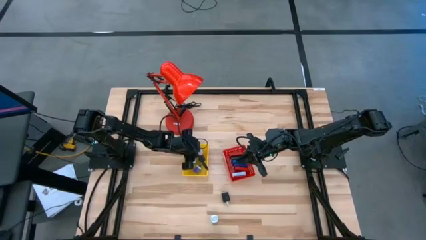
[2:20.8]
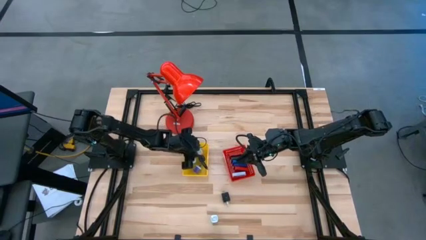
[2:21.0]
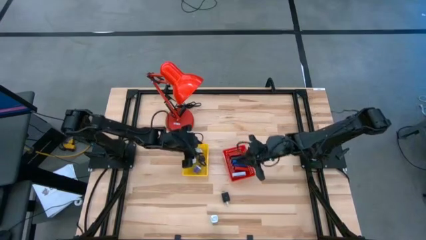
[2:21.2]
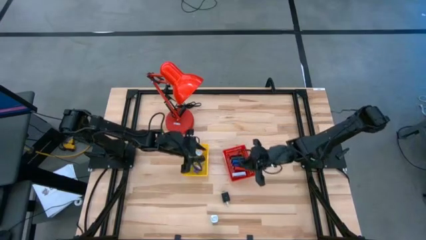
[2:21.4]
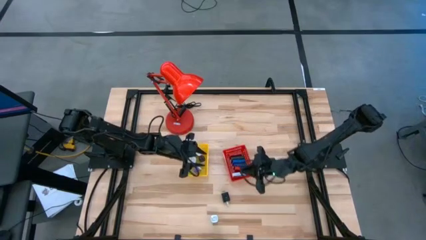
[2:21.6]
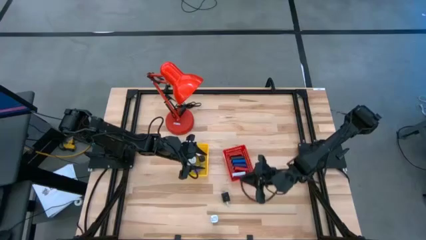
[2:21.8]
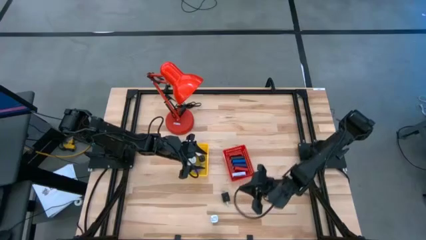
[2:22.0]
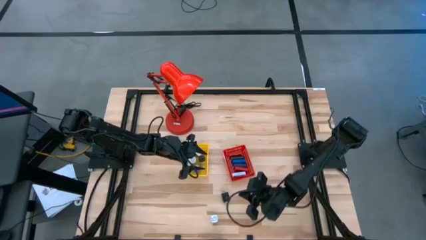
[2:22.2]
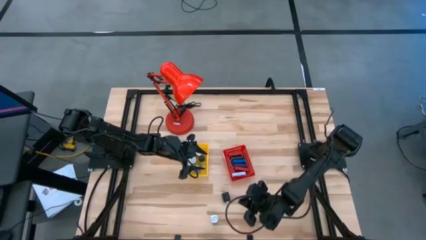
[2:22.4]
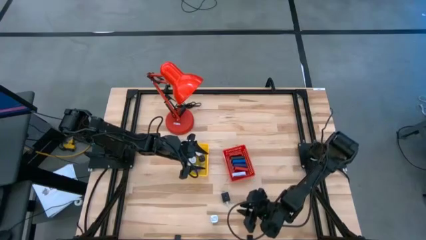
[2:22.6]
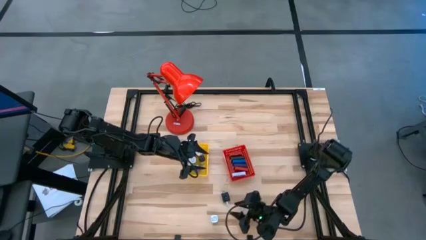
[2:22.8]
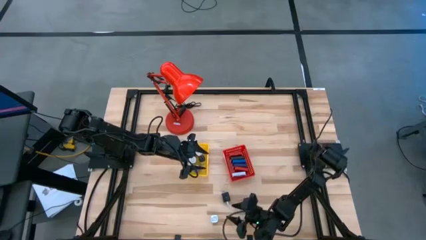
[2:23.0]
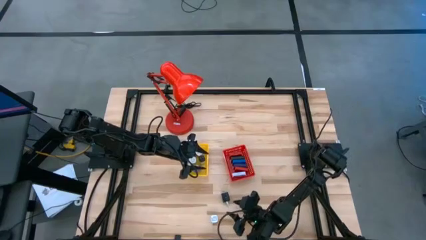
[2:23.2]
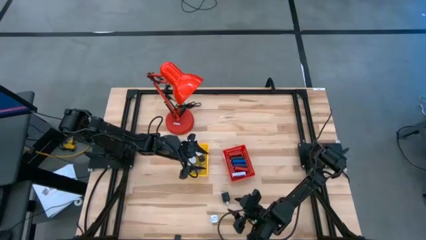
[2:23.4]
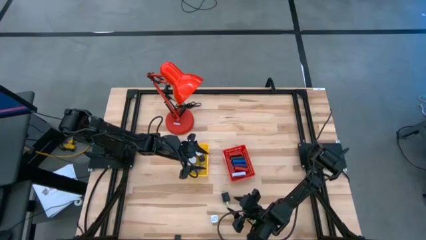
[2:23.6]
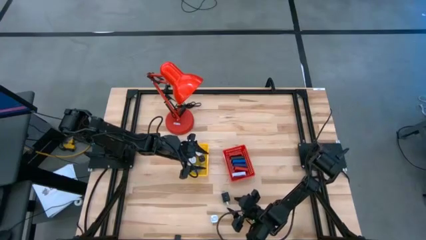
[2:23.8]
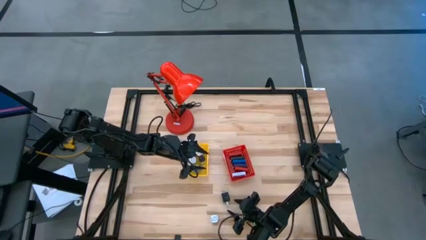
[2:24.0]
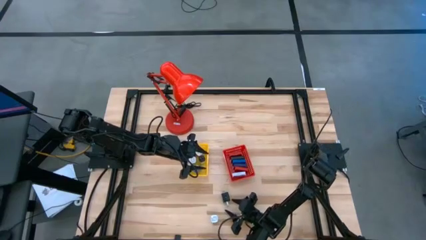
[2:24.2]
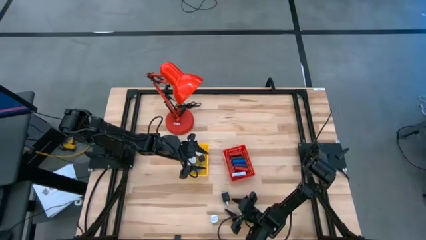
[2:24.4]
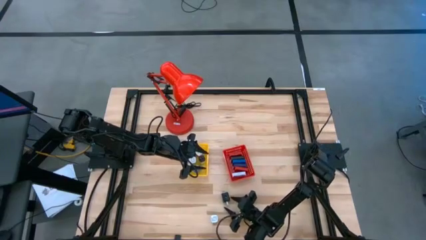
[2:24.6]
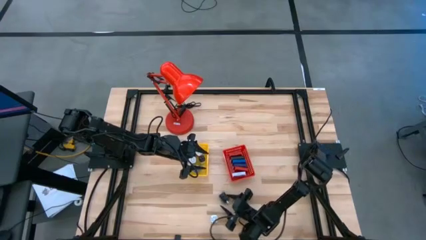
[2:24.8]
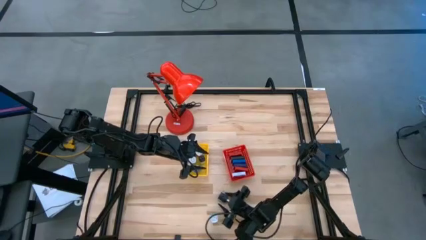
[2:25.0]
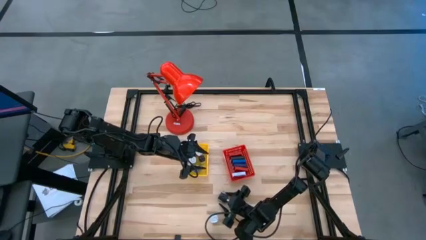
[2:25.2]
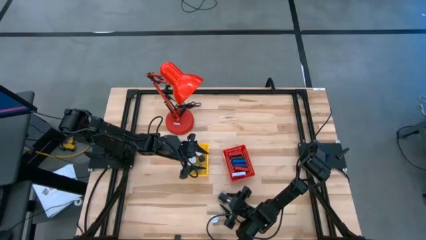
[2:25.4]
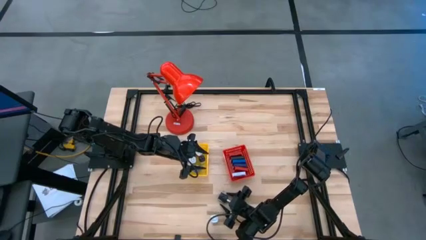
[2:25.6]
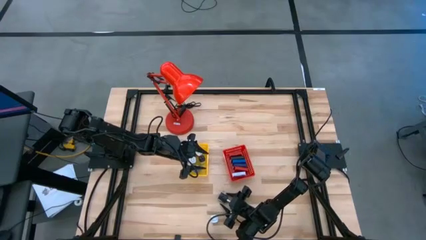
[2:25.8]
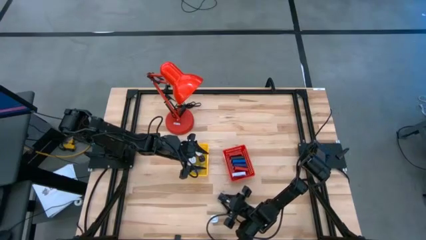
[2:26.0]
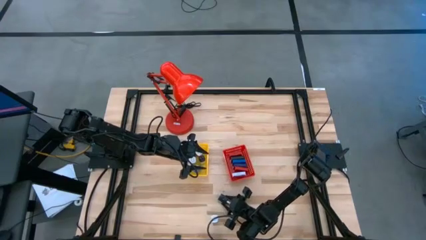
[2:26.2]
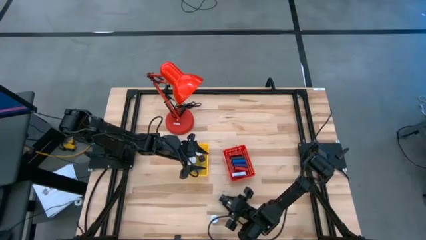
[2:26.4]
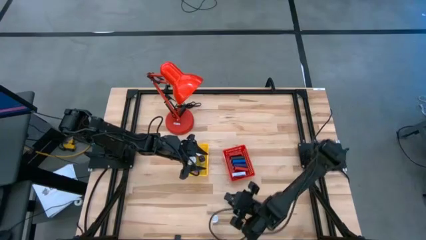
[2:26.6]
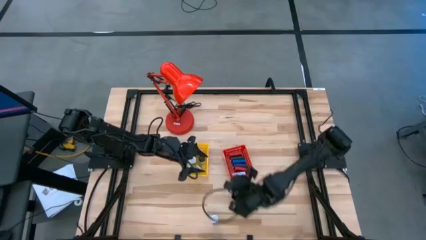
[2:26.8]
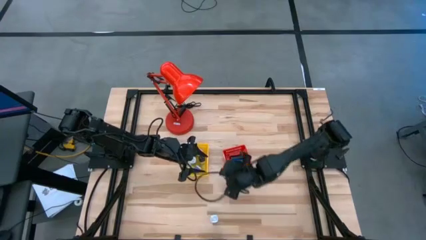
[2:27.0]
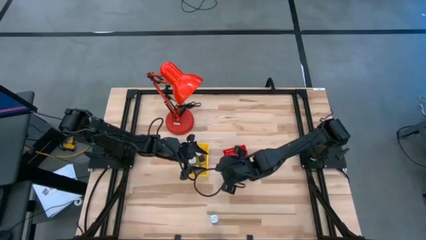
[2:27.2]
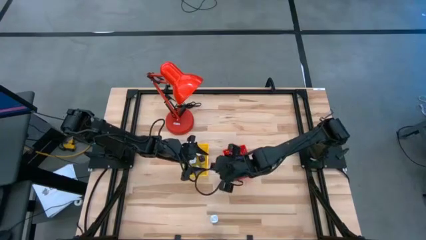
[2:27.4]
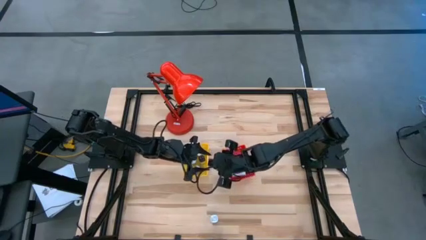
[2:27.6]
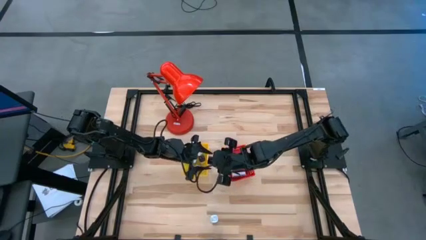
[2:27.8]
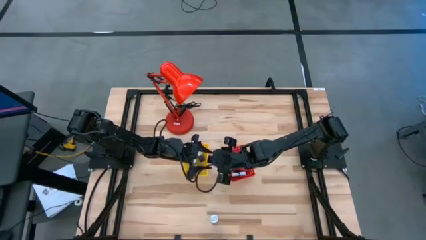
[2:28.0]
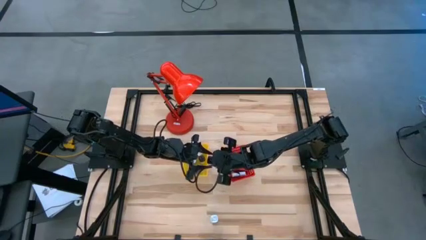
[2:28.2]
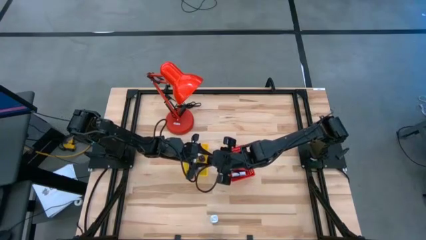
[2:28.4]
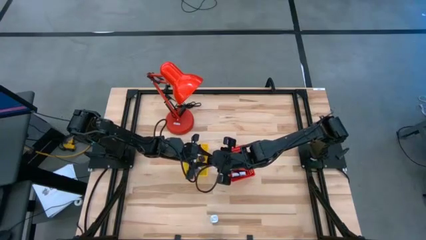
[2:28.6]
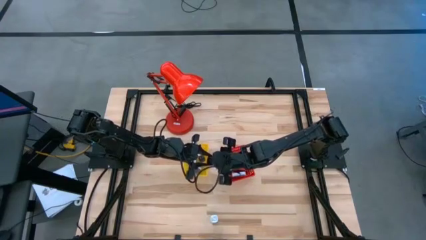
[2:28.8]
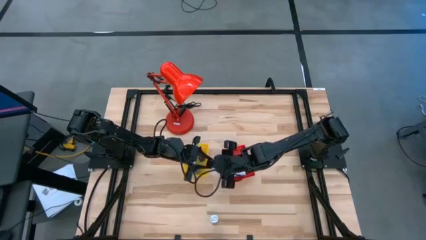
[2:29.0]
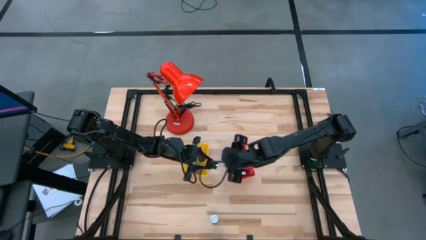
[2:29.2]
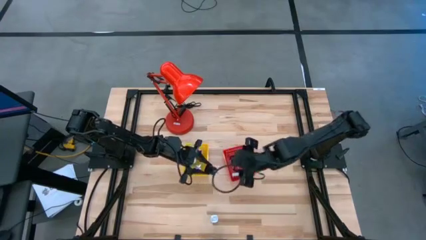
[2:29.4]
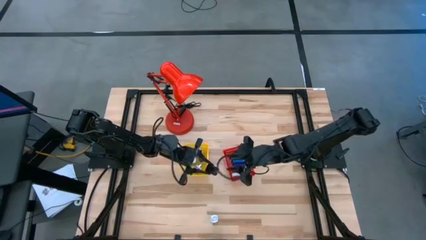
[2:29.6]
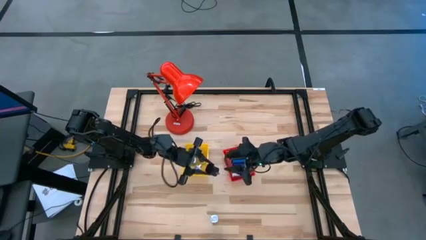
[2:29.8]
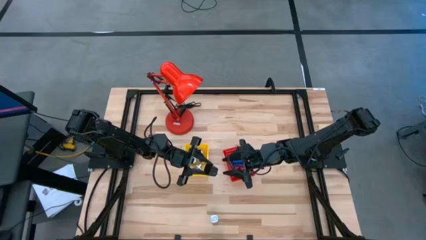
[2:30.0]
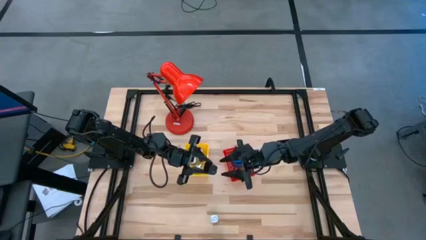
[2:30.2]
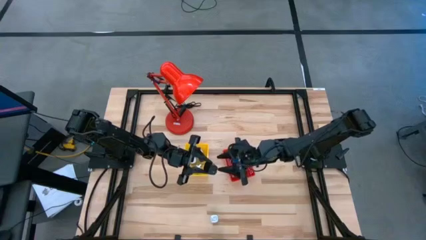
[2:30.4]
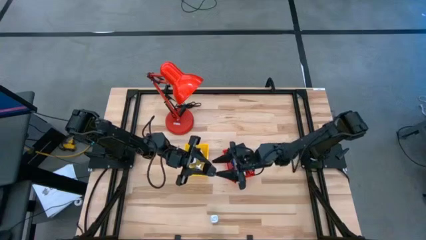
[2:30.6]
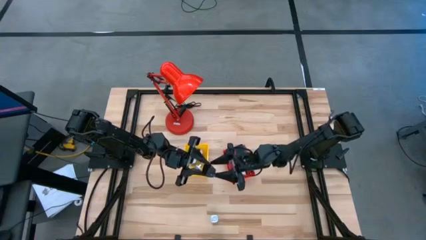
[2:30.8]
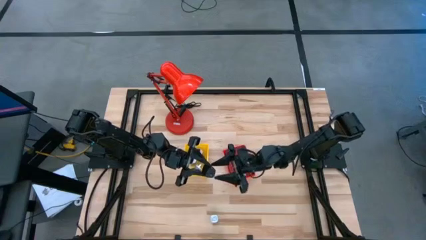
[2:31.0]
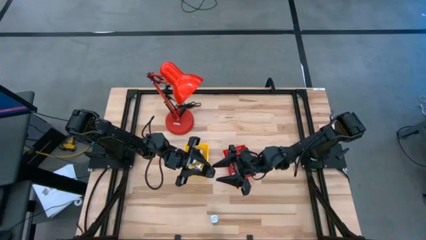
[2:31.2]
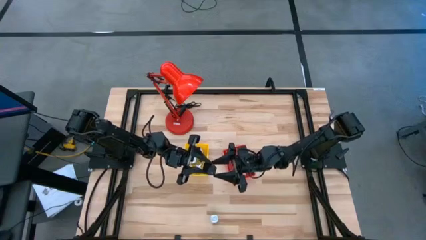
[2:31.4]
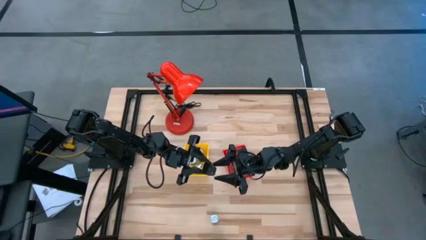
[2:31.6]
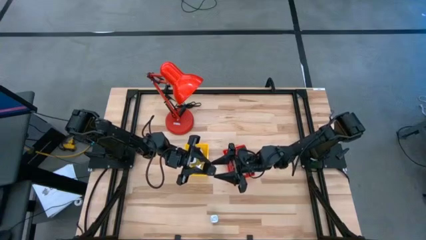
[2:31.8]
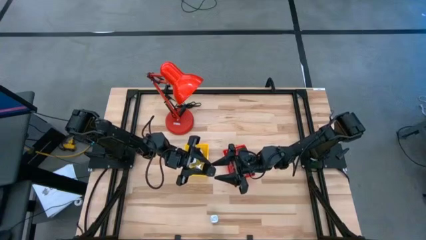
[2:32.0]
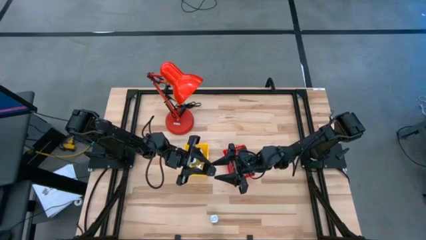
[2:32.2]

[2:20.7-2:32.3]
Task: Pick & Place Office items
Put the black charger adapter into the yellow bin

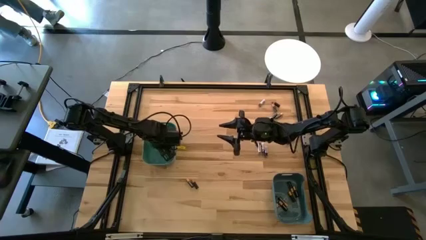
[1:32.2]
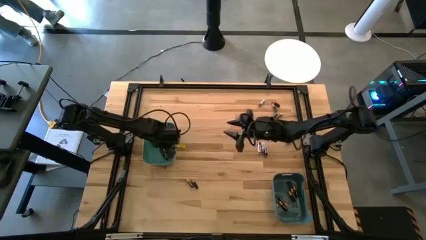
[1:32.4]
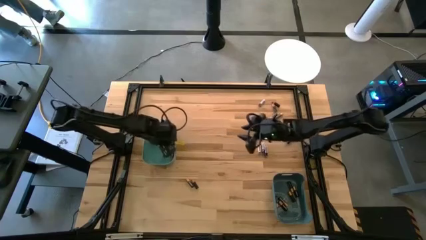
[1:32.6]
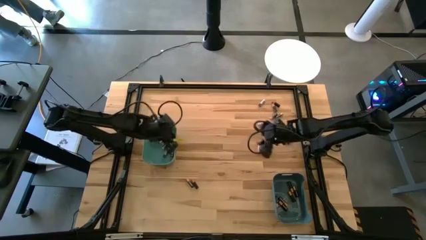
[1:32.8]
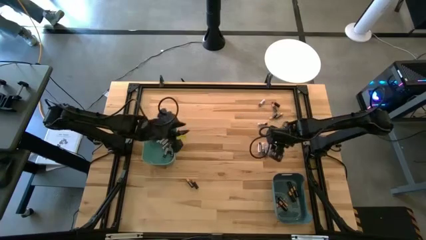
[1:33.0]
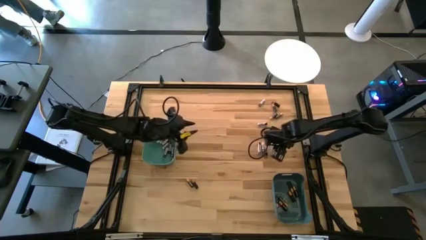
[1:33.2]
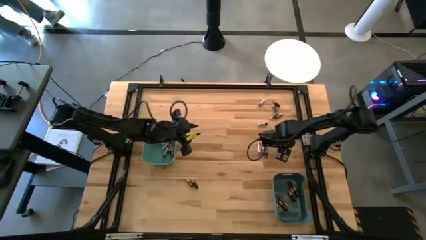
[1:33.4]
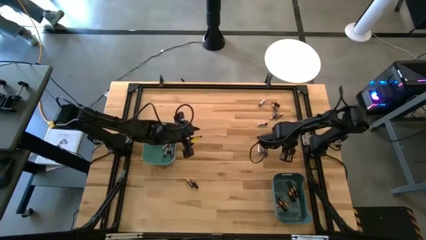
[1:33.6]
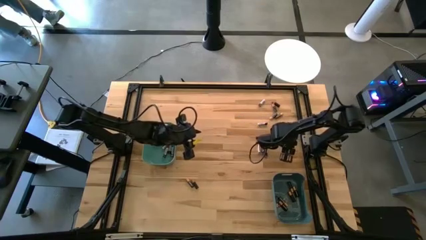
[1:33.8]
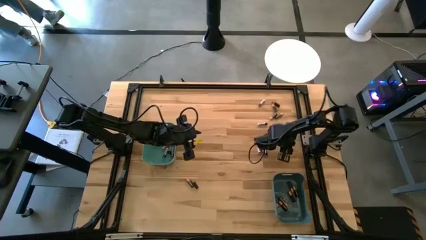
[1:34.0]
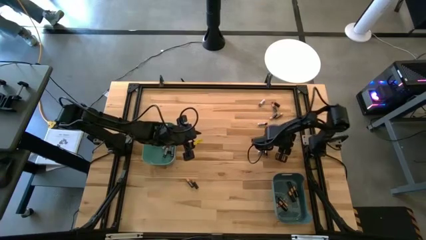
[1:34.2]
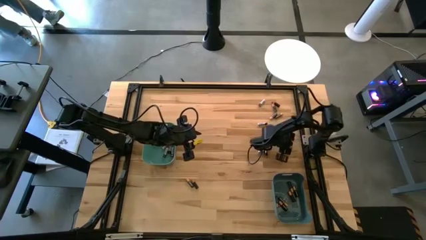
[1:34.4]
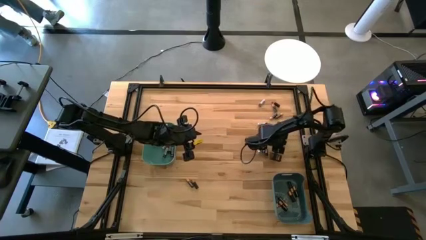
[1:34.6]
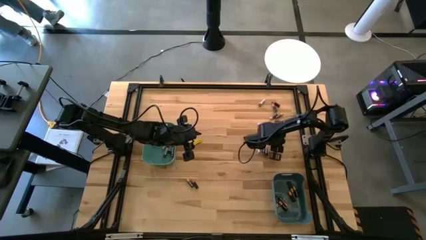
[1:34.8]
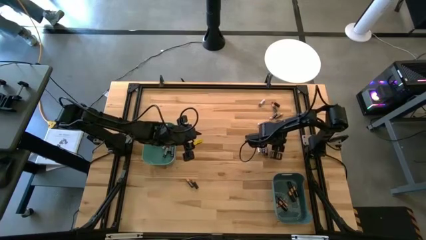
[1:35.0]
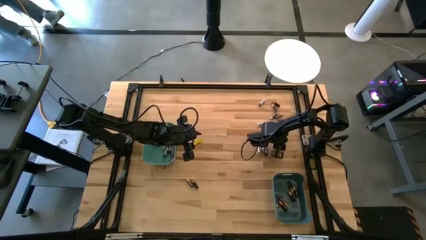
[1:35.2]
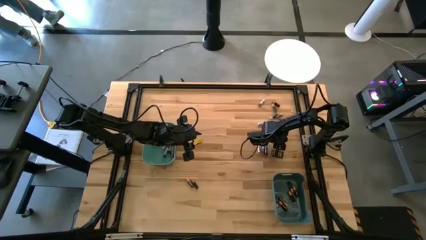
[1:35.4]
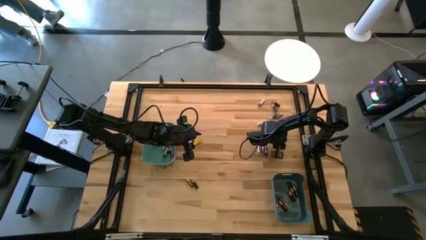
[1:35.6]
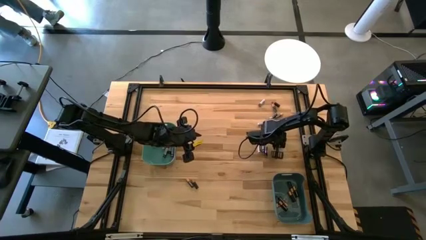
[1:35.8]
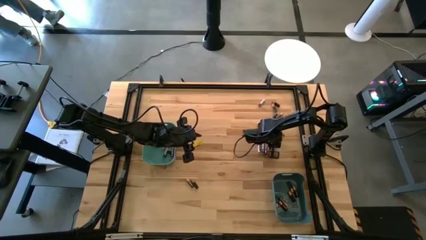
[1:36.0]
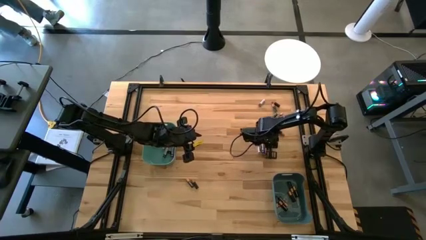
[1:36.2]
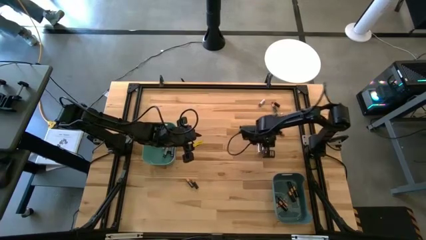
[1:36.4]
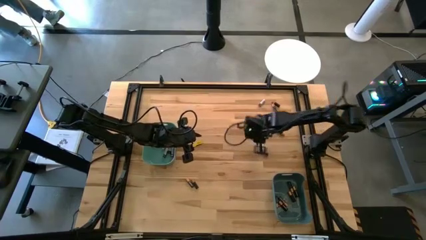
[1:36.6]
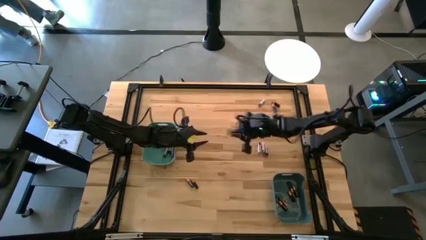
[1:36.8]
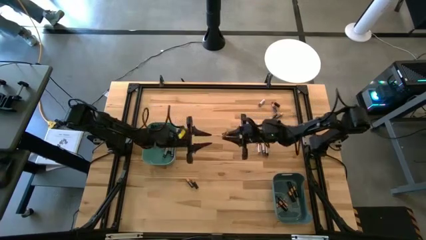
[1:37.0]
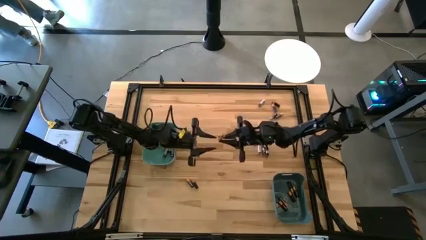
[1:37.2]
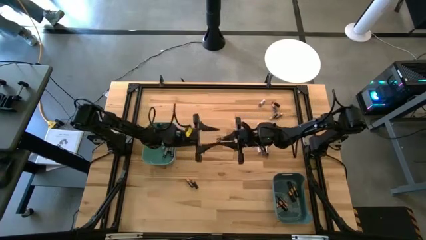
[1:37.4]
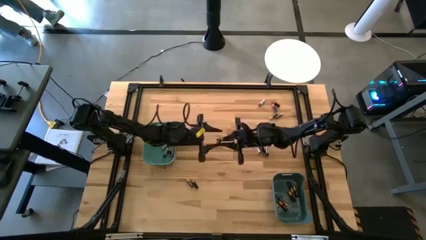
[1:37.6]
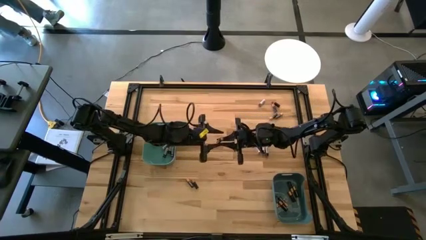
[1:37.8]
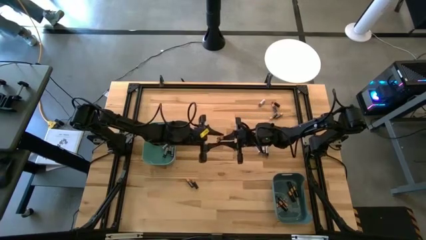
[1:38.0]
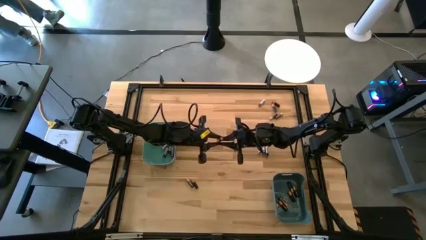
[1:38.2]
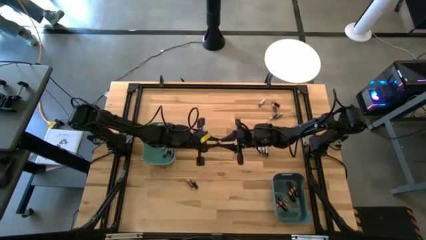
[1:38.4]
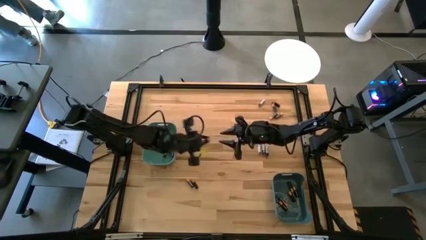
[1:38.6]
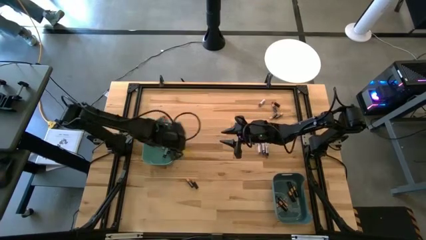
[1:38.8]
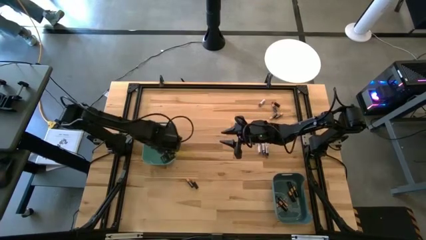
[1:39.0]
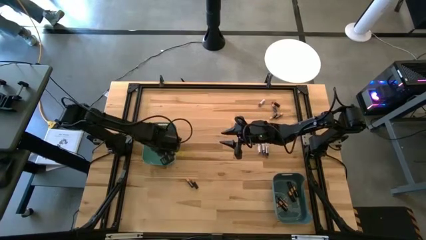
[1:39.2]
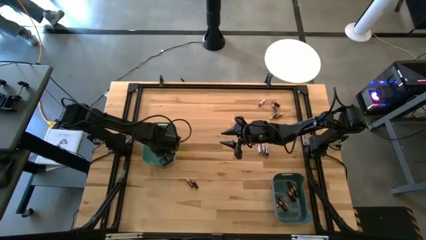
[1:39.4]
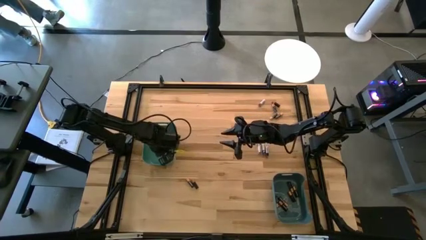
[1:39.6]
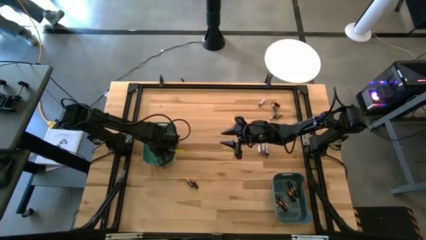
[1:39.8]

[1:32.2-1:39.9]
Task: Sort batteries
Put the silver battery into the green bin
